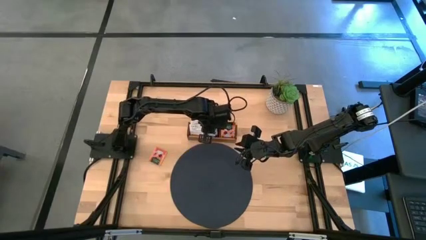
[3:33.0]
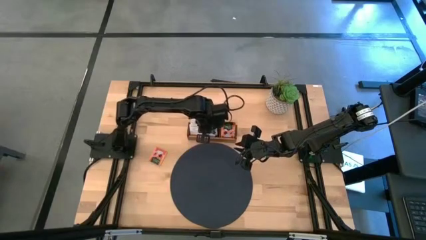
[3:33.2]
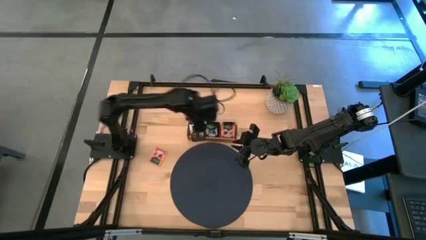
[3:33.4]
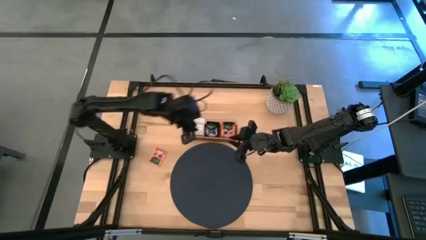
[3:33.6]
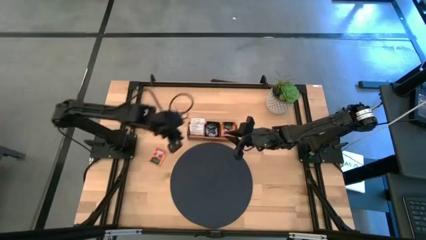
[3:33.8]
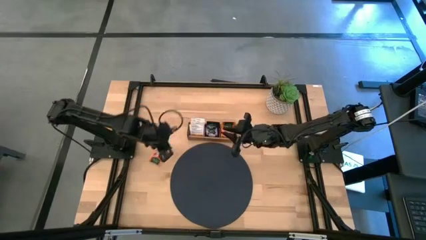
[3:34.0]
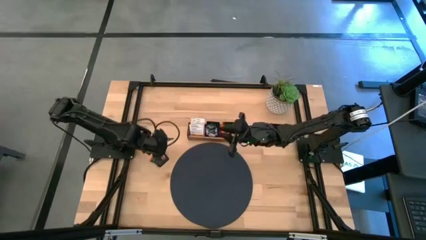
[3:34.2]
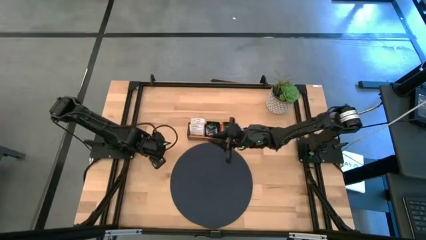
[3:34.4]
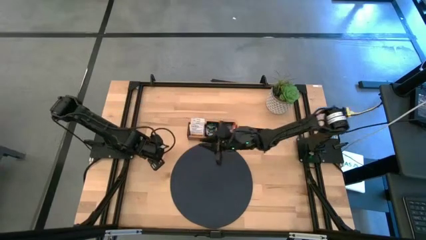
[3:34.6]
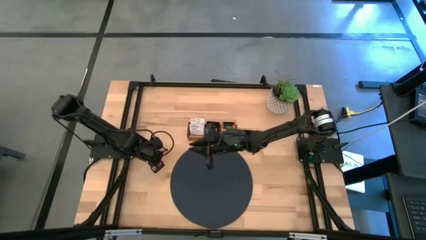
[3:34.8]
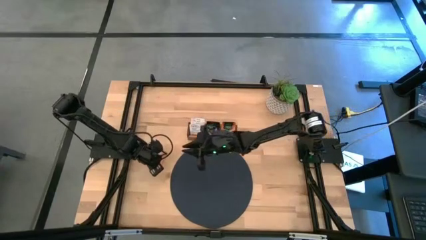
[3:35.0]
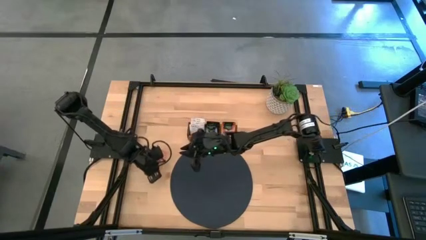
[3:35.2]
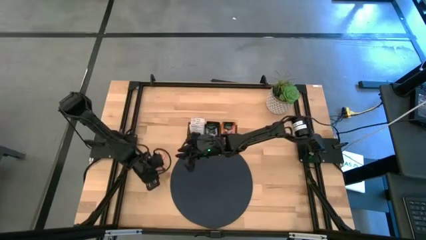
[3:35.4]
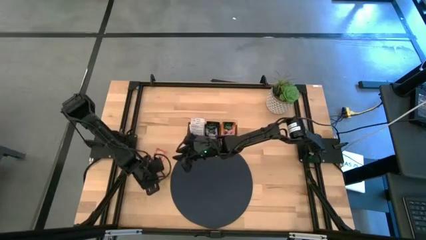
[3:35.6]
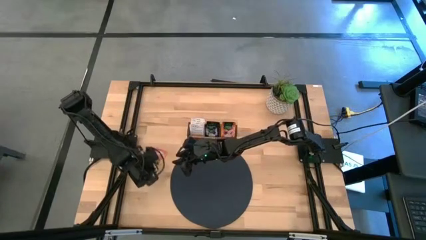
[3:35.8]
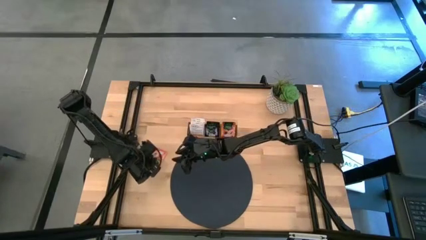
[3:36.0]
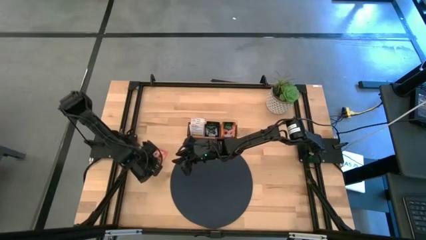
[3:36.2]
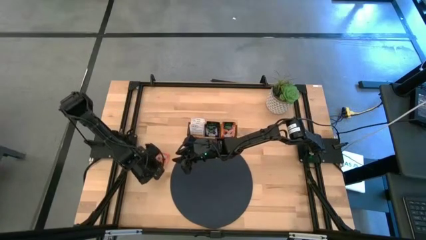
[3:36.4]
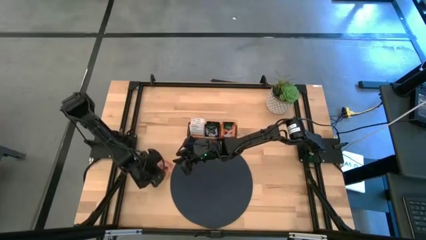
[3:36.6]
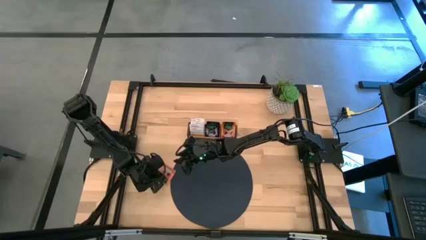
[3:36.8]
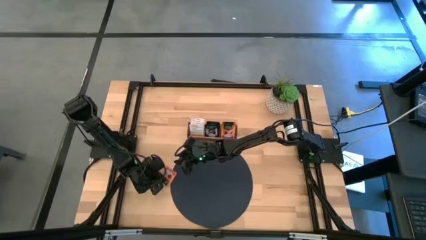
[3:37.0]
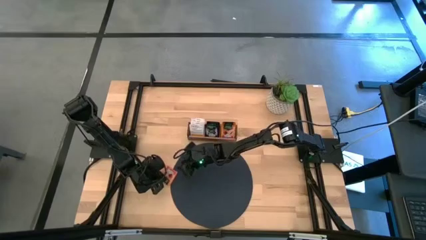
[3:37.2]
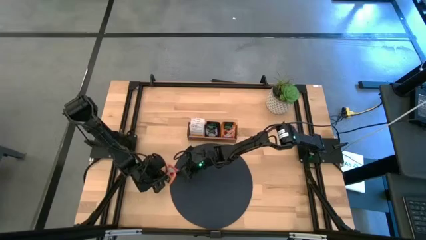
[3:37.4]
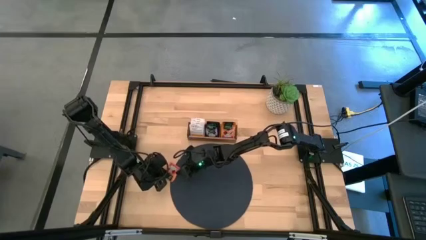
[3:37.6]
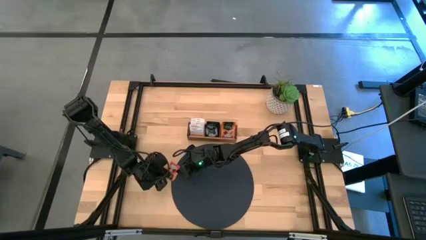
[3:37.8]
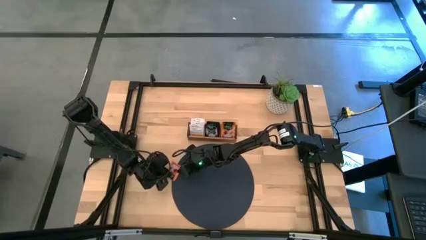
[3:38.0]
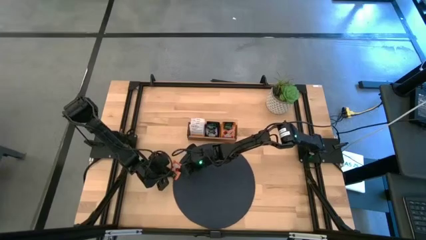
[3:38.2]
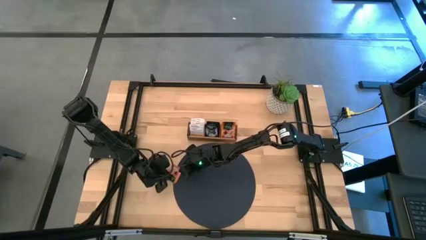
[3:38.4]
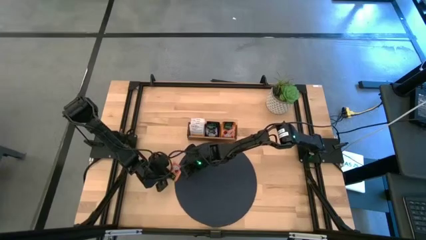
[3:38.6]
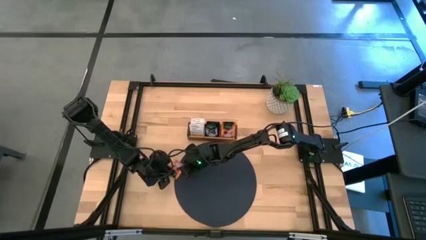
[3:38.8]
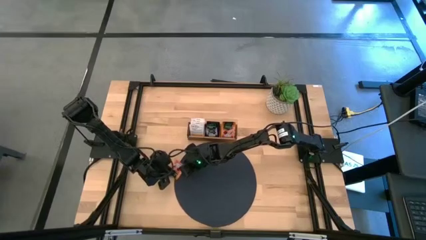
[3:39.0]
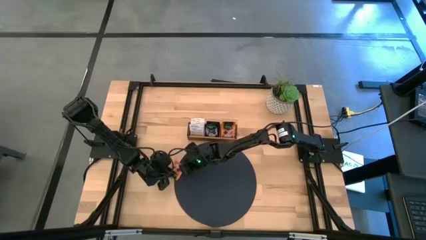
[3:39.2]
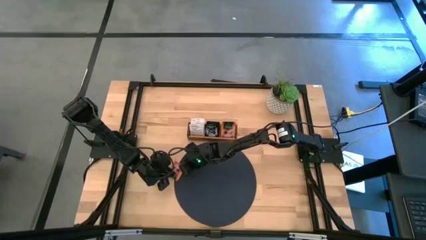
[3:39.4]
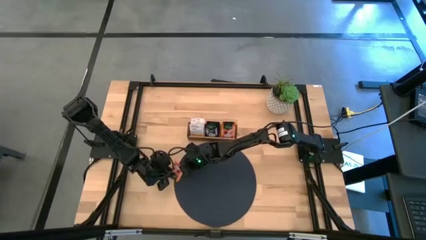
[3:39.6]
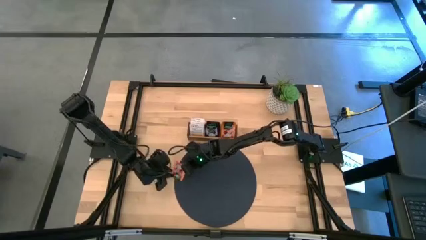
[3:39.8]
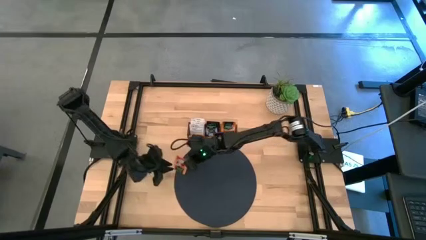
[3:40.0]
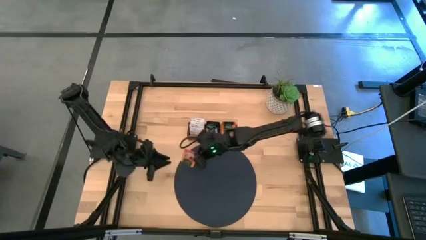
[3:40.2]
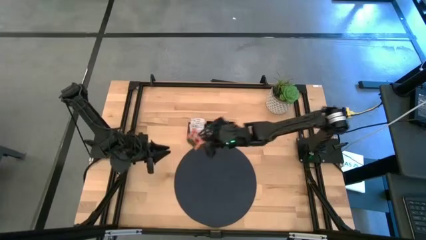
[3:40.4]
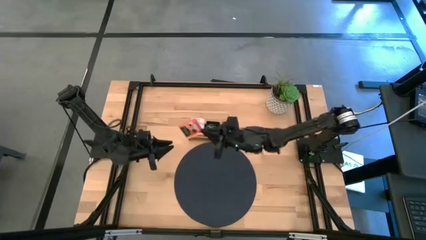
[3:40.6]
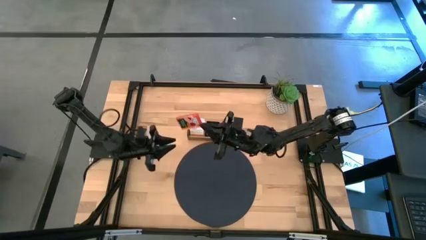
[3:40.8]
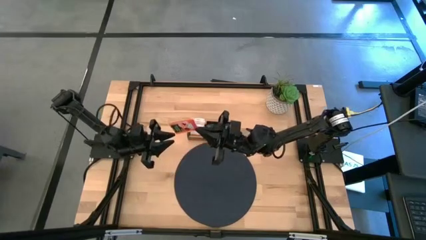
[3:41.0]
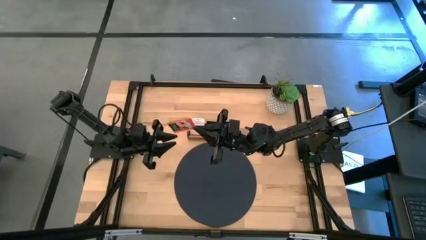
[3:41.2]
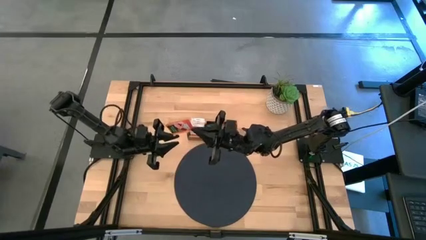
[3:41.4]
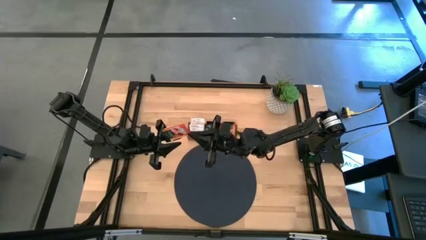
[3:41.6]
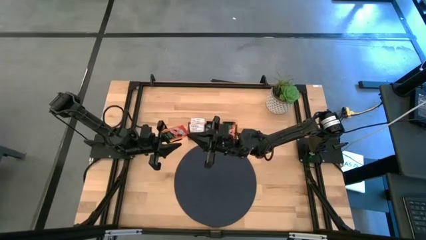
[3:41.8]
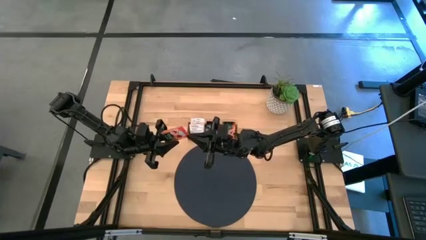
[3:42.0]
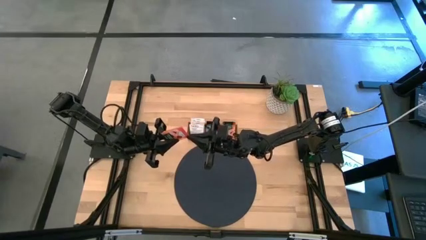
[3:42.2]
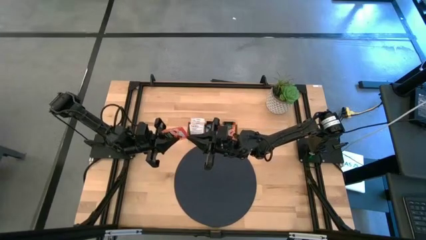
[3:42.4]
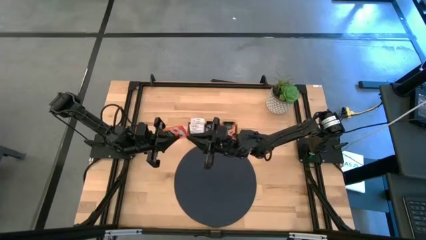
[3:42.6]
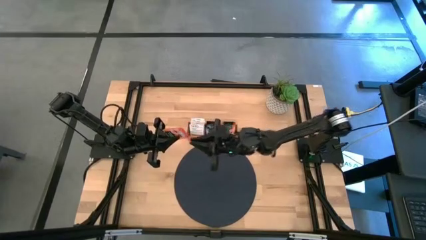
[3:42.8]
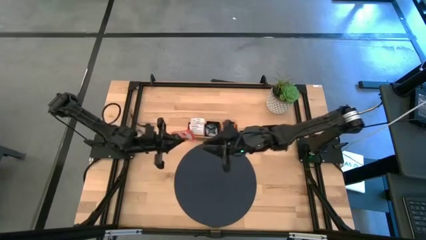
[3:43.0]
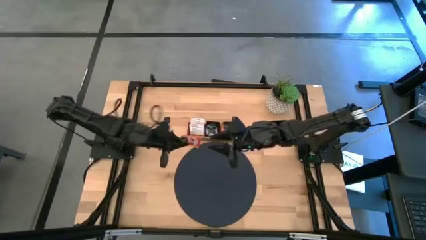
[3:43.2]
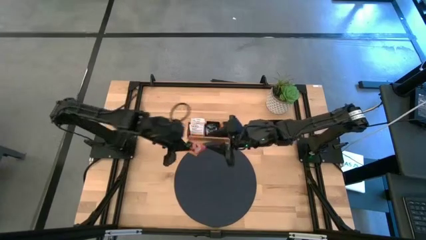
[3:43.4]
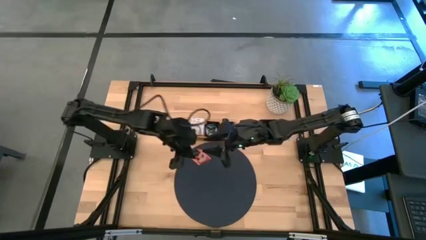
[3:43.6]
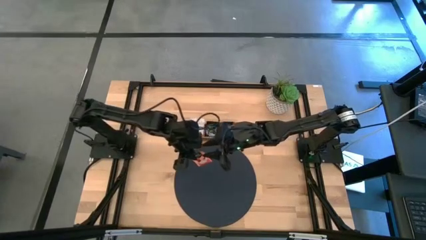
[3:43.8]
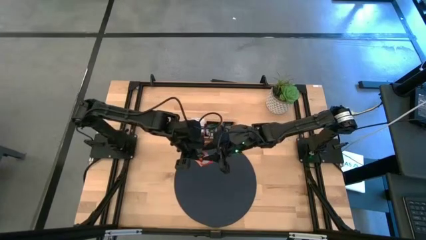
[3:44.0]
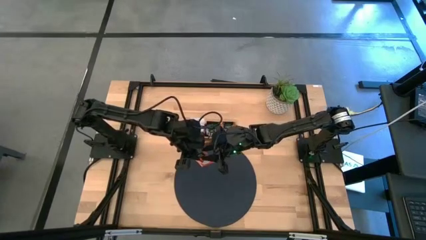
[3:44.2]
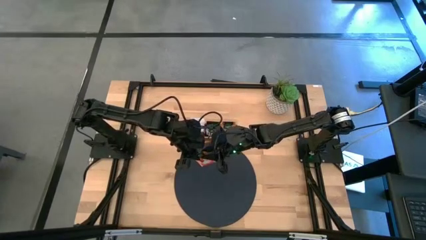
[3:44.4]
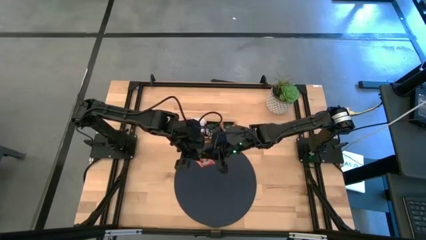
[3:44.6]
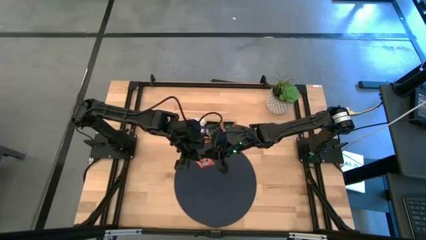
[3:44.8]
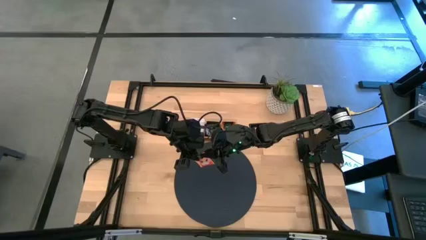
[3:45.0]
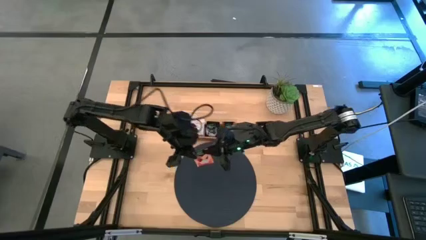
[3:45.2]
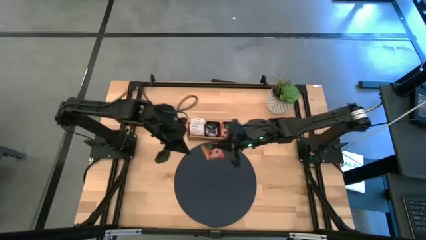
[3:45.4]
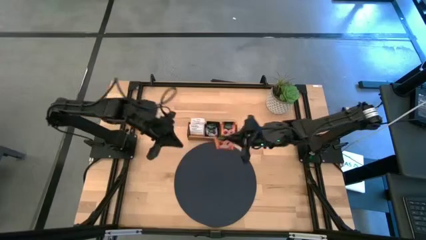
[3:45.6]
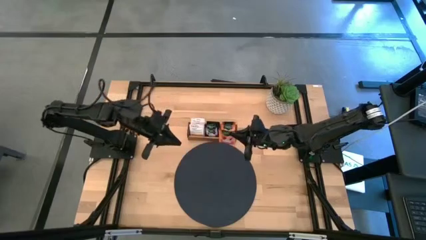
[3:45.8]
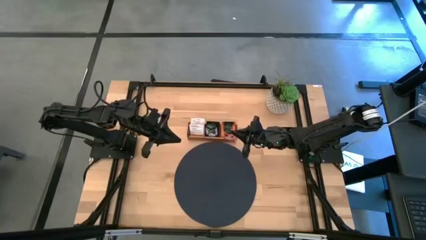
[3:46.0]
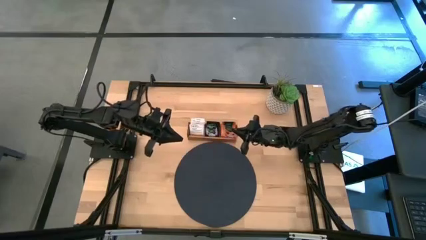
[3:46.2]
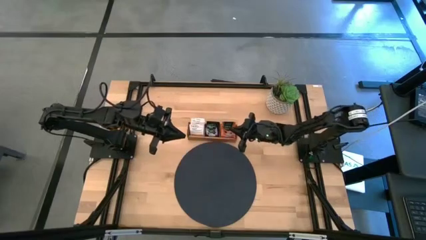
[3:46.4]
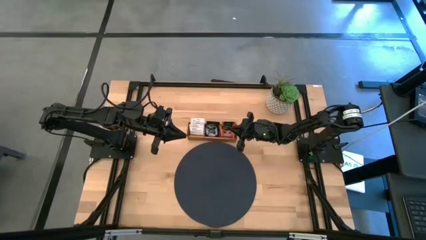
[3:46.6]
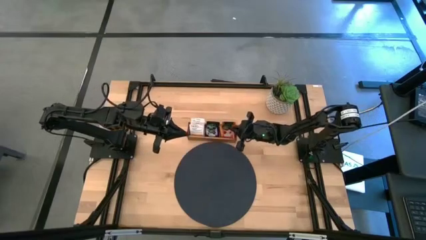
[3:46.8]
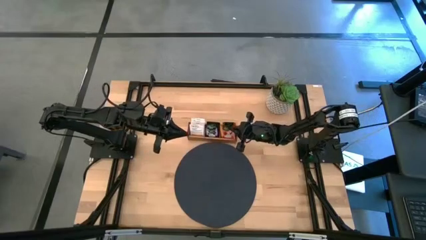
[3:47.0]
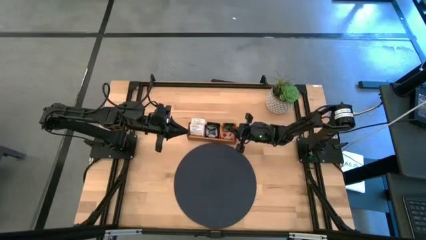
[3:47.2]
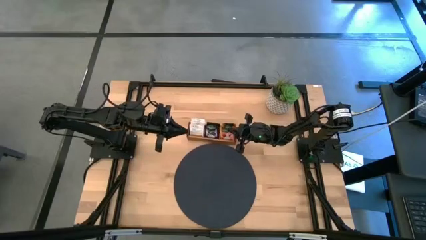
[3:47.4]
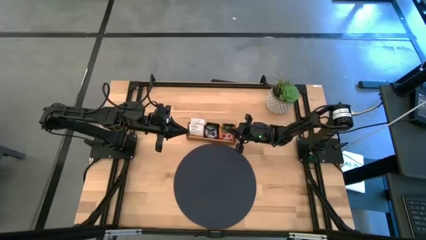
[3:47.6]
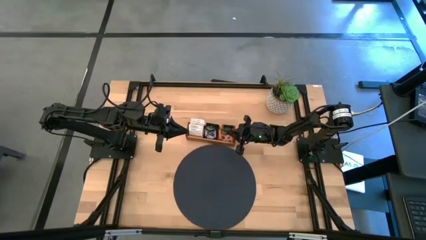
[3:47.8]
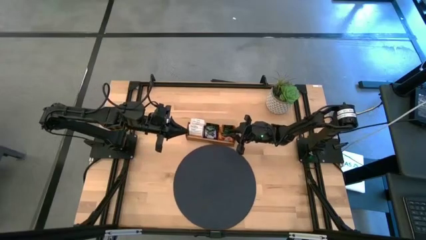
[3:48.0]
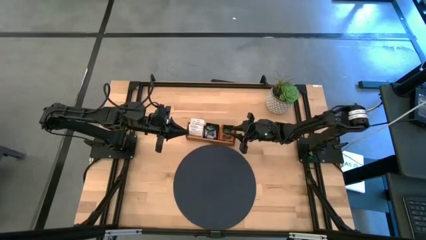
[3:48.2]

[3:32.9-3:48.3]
Task: Pick & Place Tea
Put the orange tea bag into the right of the wooden organizer

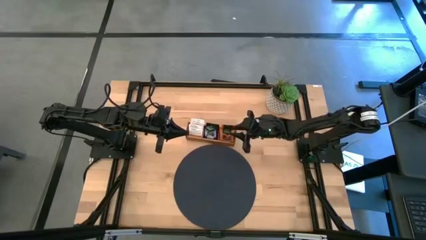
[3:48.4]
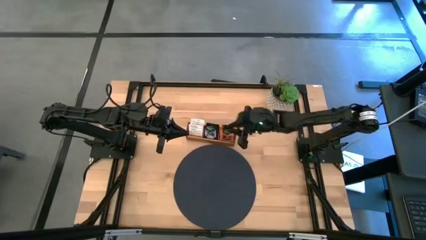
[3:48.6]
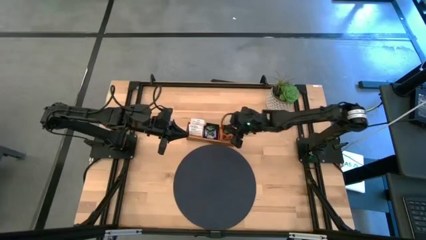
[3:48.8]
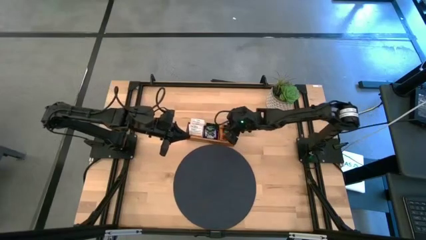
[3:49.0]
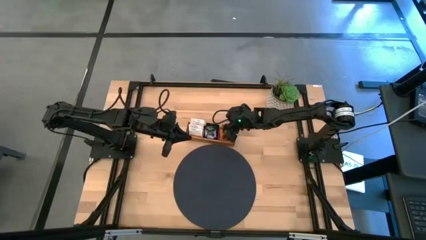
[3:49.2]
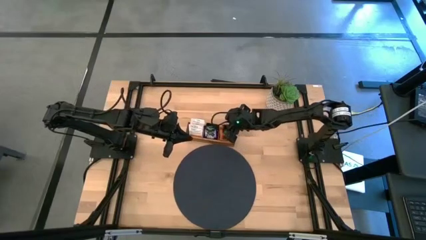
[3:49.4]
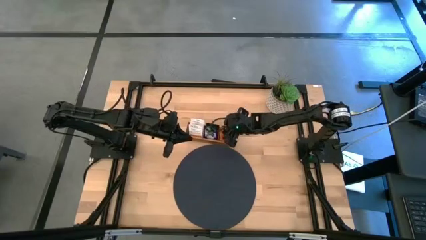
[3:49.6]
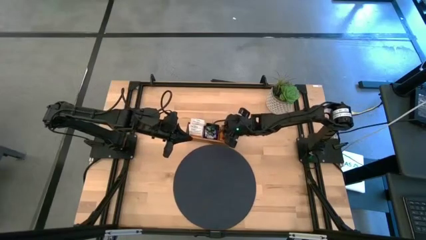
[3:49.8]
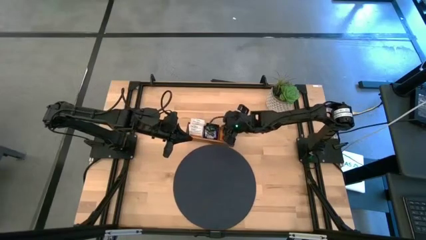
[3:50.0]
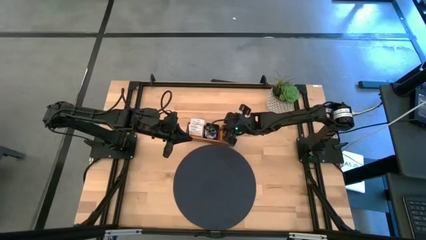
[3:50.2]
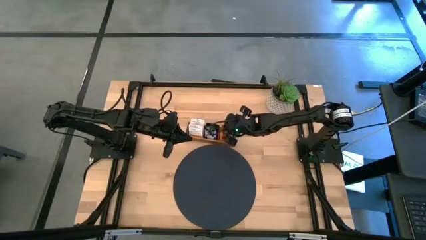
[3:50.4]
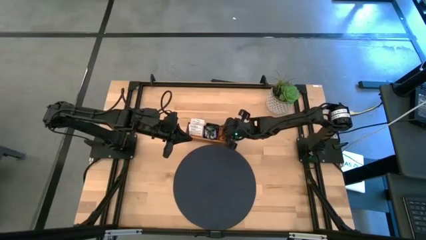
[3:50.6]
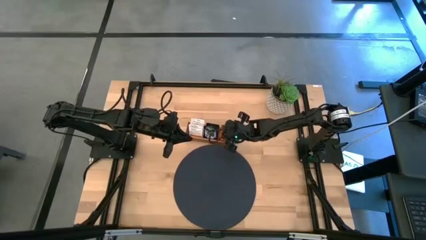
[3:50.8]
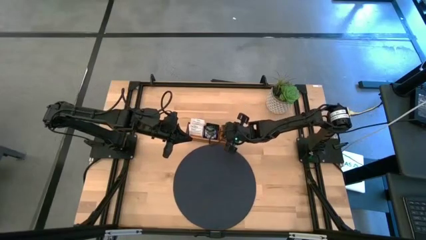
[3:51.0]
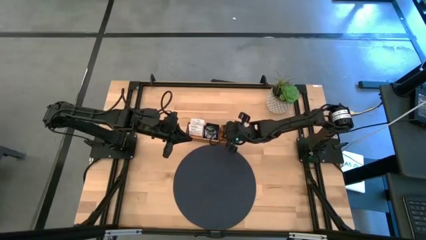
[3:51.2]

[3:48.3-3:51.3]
Adjust the orange tea bags in the wooden organizer
